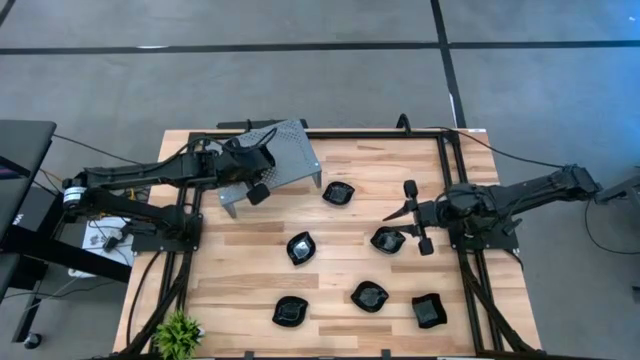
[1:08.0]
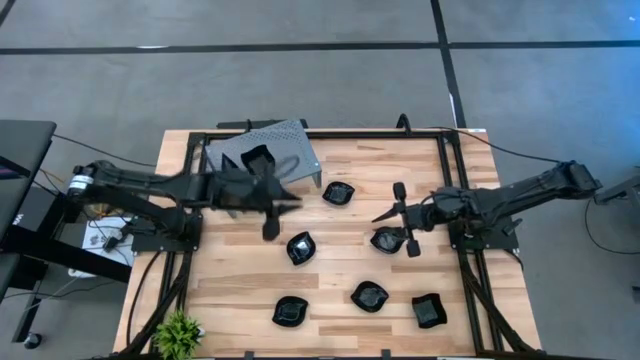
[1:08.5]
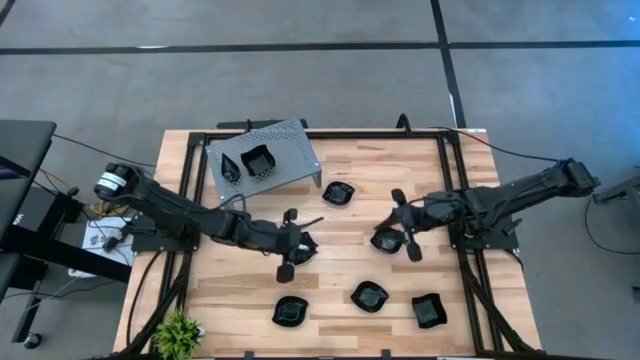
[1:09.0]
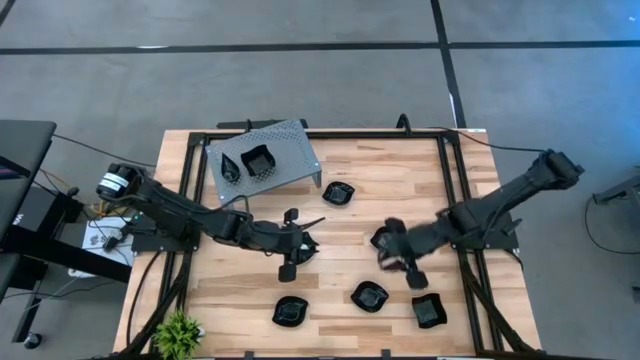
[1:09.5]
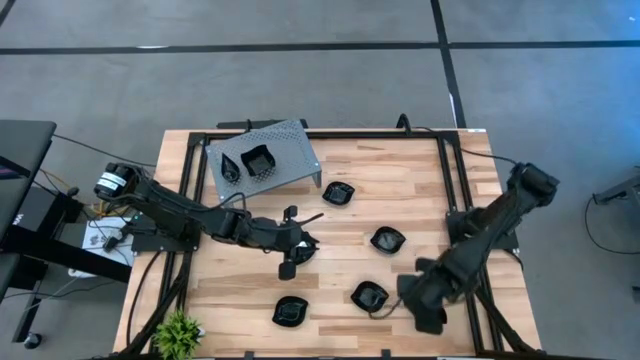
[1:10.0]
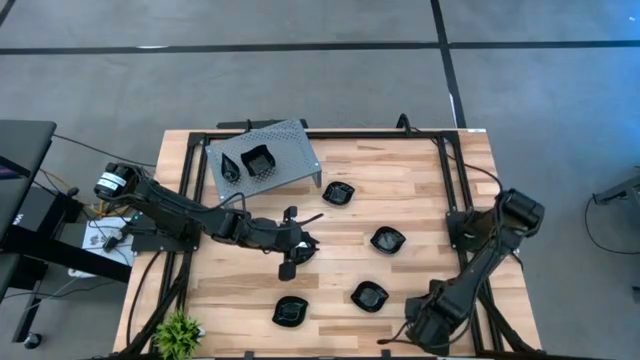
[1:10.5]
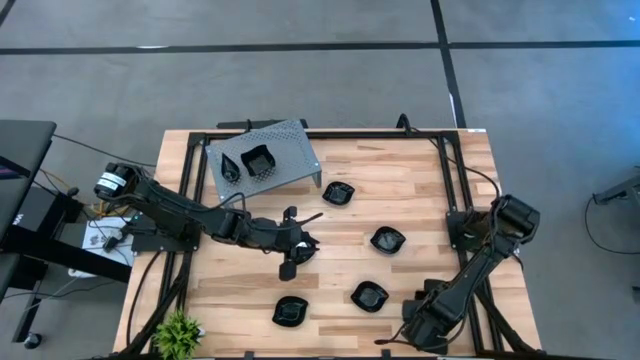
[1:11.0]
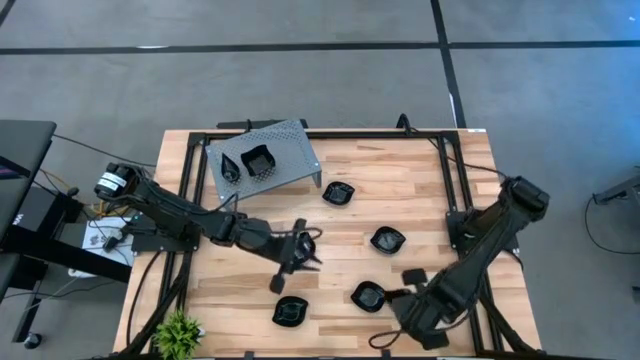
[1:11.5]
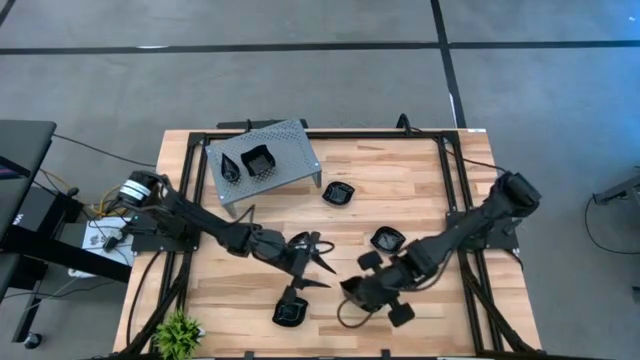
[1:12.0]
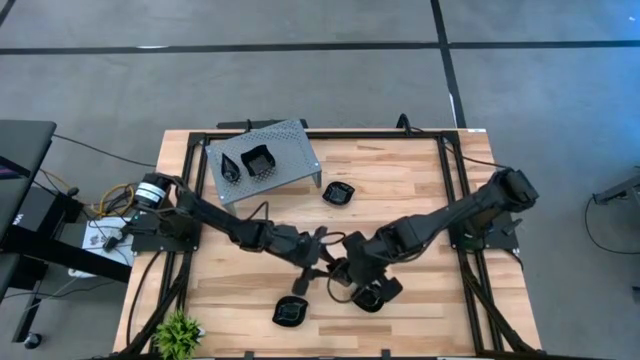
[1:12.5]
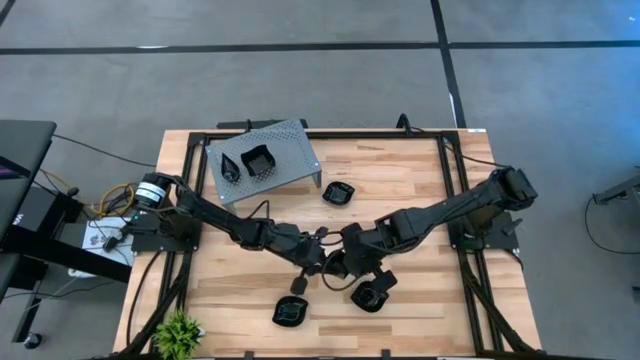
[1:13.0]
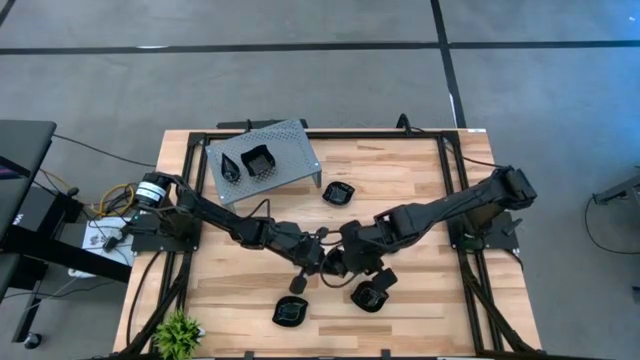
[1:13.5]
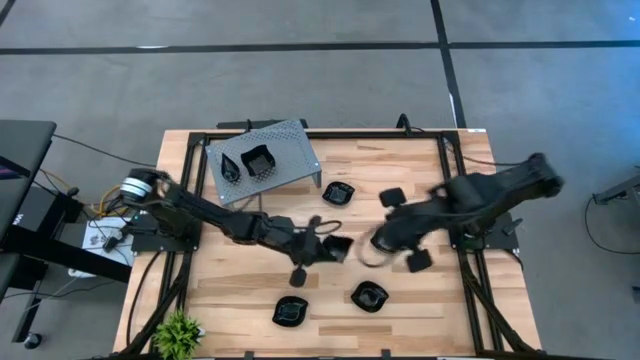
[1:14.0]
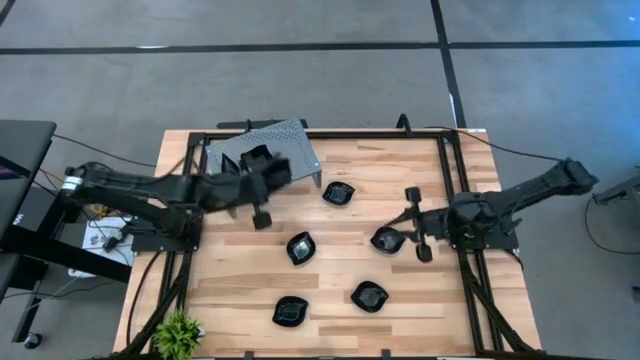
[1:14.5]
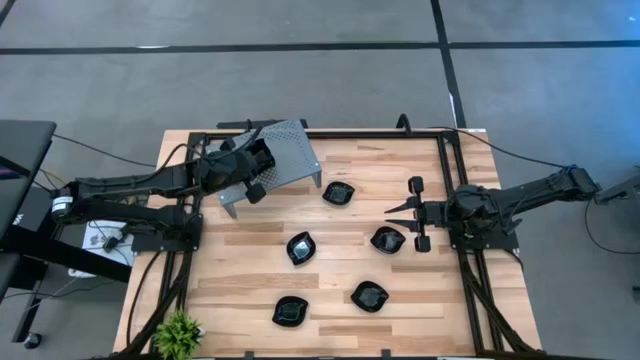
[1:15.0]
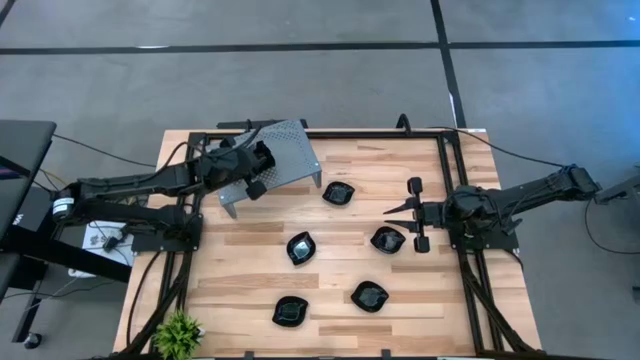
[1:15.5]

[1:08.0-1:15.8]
Task: Pick & Place Mini shaped plates
Stack the black distorted square plate on top of the black distorted square plate on the shelf

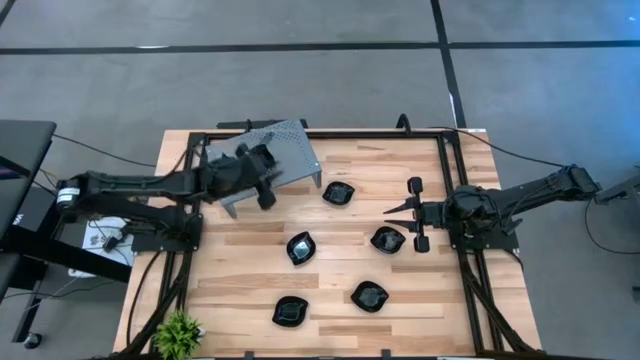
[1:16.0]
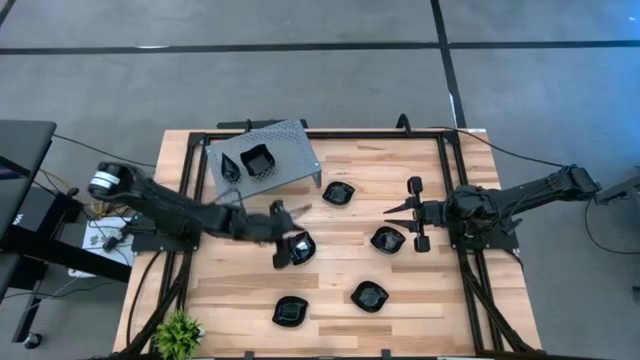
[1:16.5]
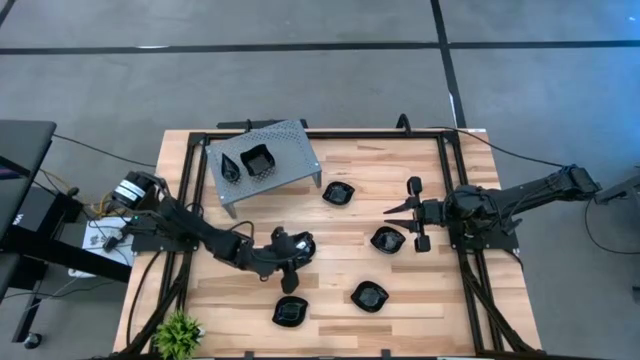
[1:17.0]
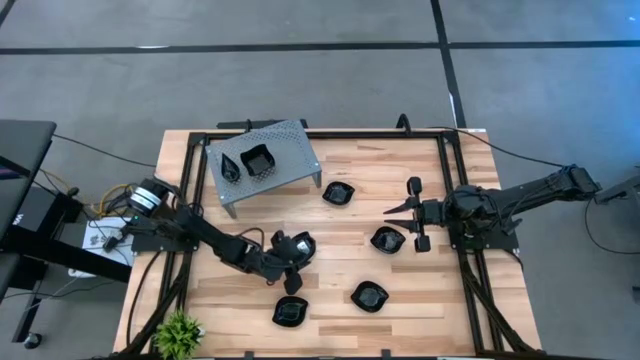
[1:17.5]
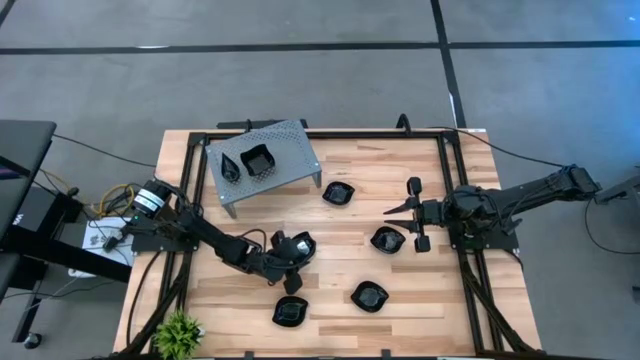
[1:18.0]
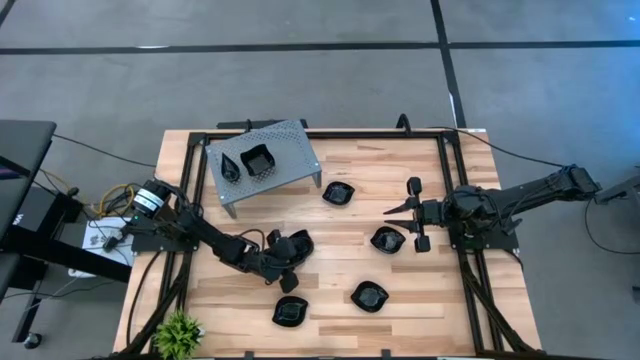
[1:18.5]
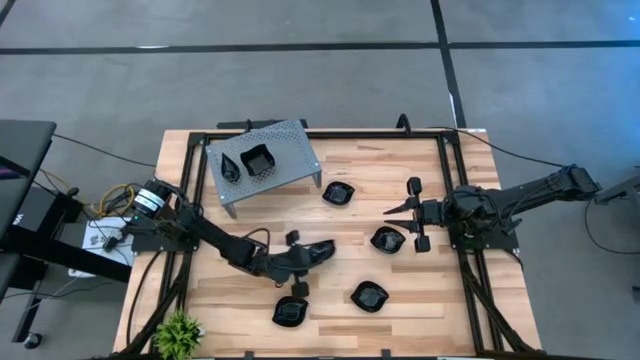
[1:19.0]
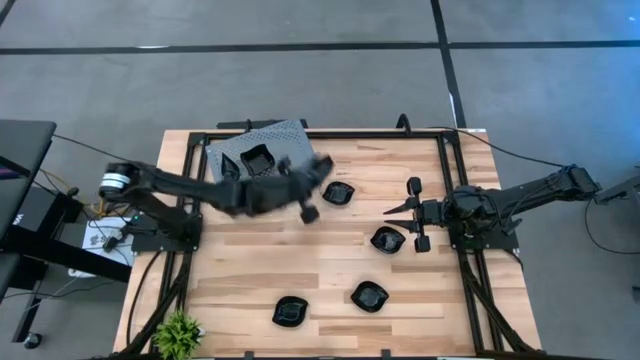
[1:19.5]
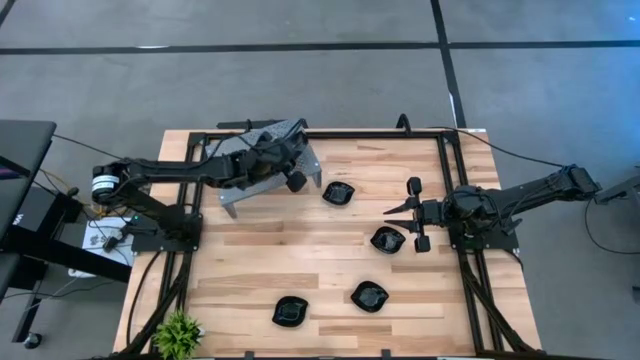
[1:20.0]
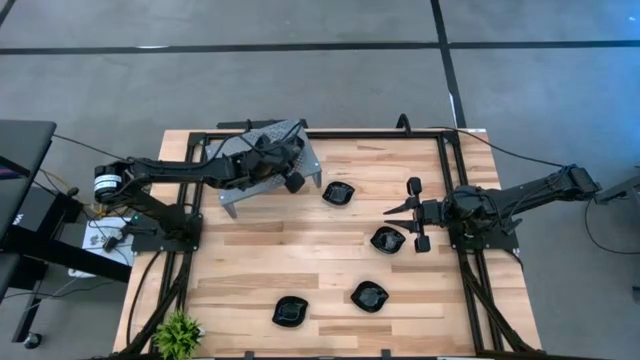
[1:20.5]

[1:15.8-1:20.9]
Put the black leaf plate on the shelf

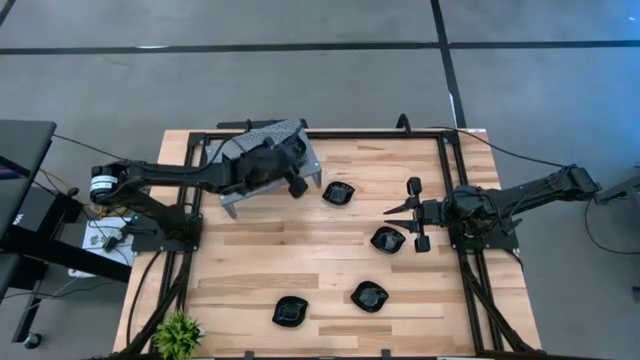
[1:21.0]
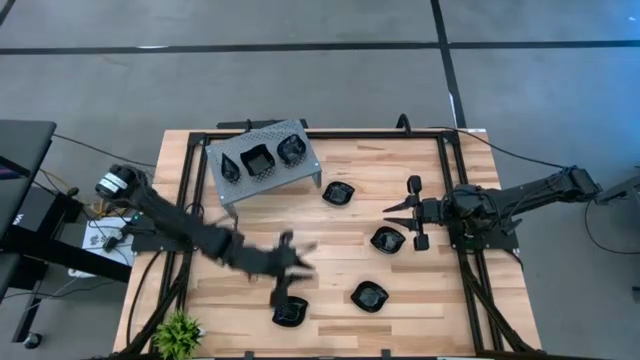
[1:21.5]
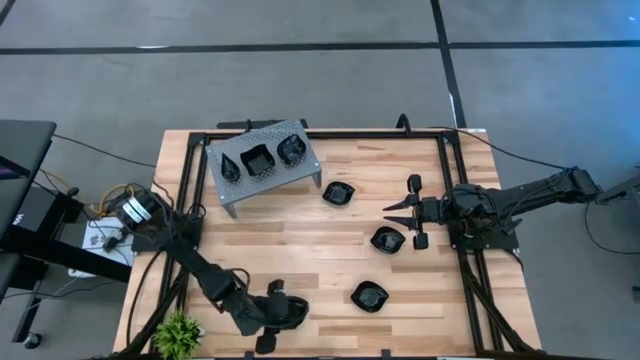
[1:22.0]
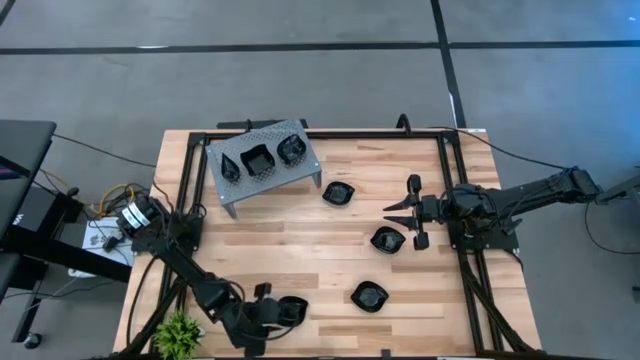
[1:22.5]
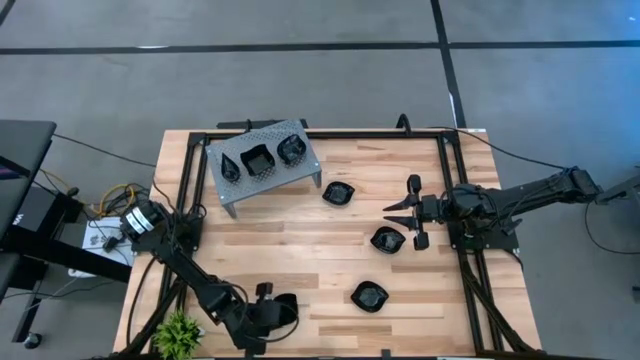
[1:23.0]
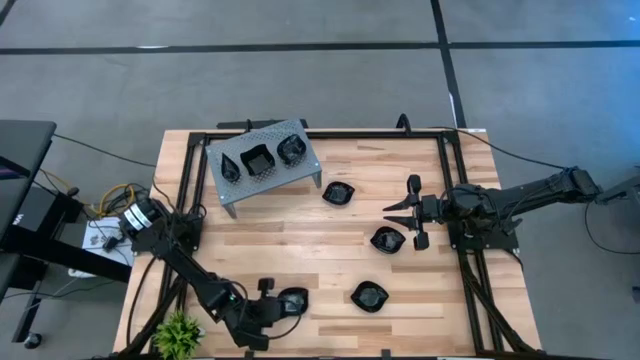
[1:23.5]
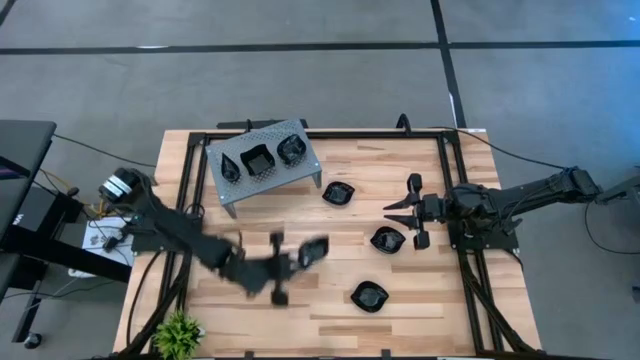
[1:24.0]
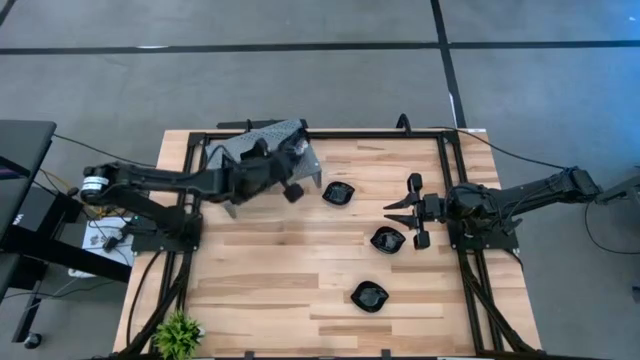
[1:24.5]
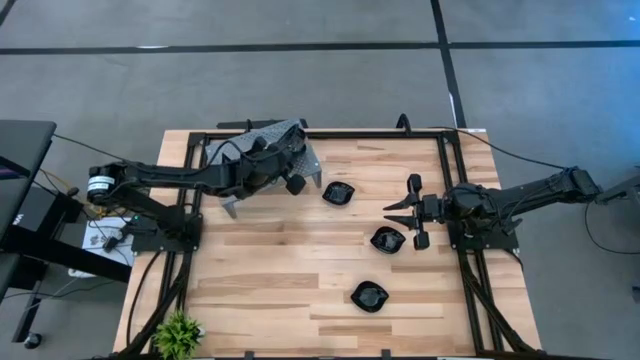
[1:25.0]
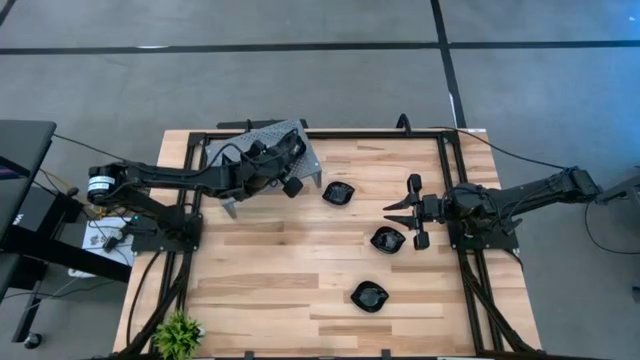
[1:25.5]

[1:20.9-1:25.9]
Stack the black leaf plate on top of the black leaf plate on the shelf

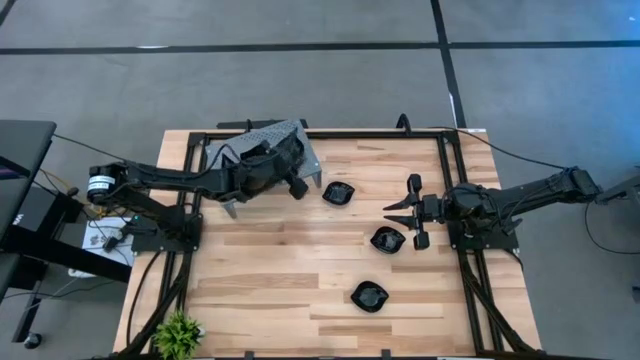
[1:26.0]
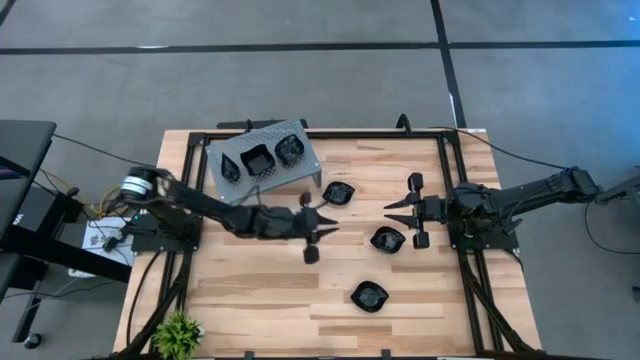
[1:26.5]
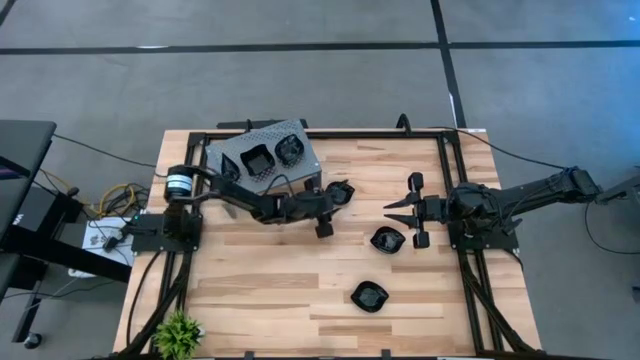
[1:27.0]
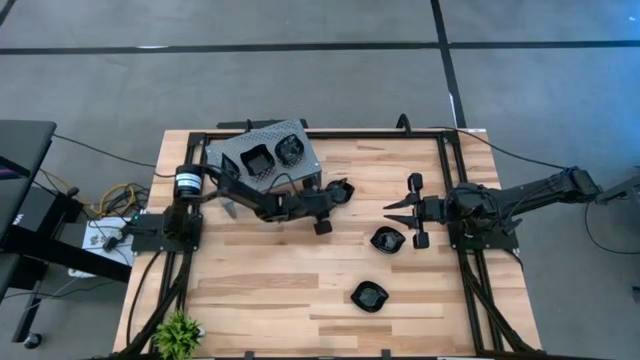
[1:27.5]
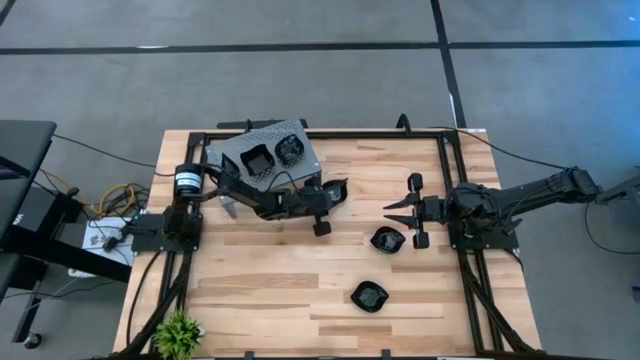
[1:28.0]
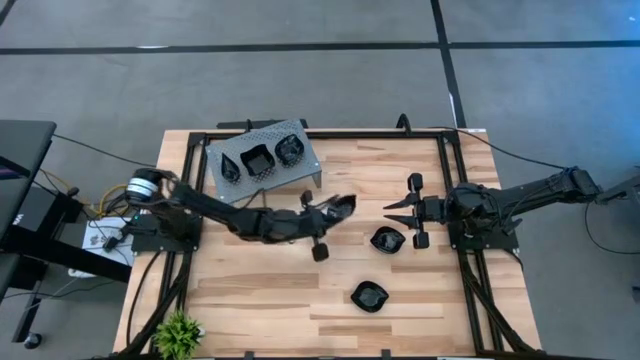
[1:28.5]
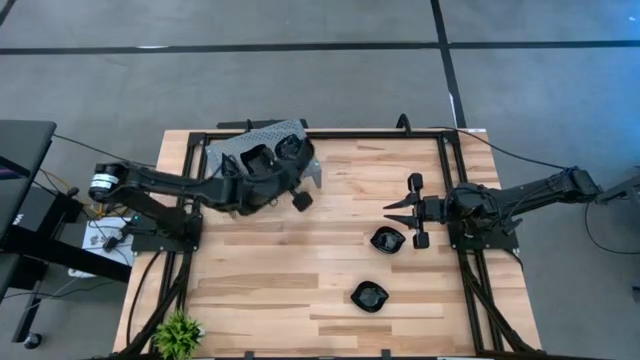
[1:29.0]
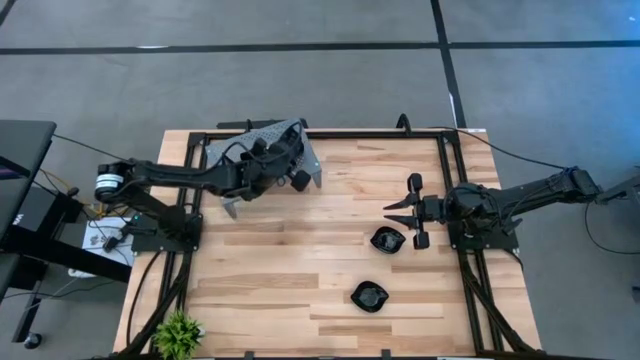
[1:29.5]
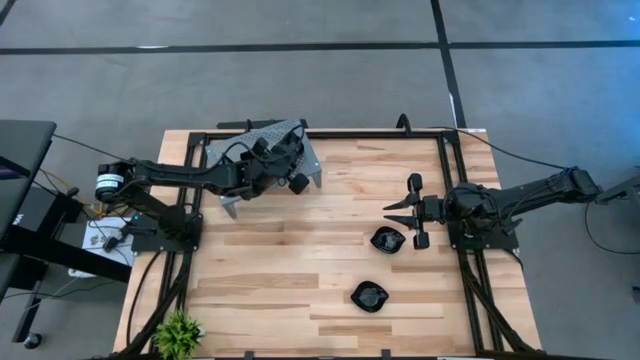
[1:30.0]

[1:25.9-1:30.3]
Stack the black leaf plate on top of the black leaf plate on the shelf
